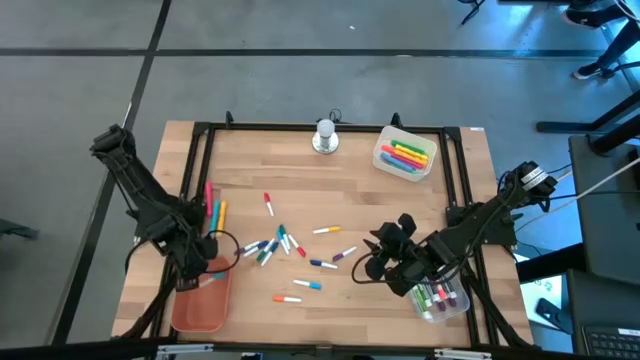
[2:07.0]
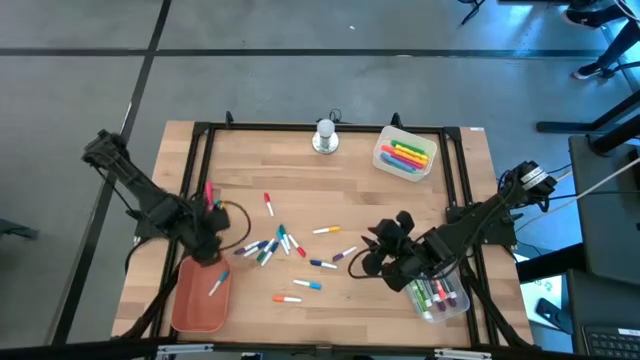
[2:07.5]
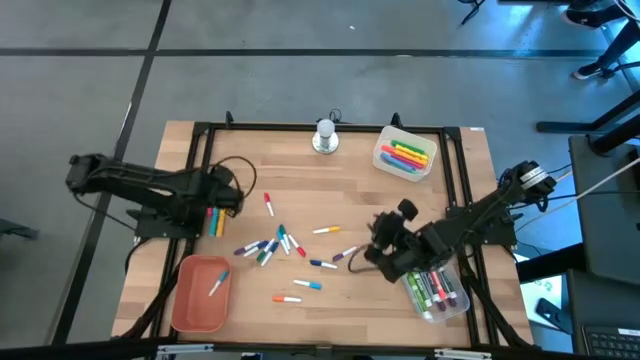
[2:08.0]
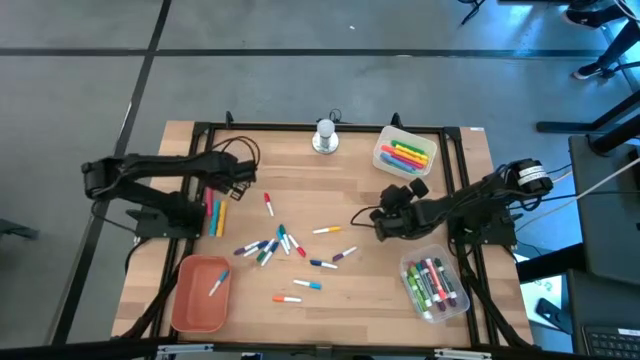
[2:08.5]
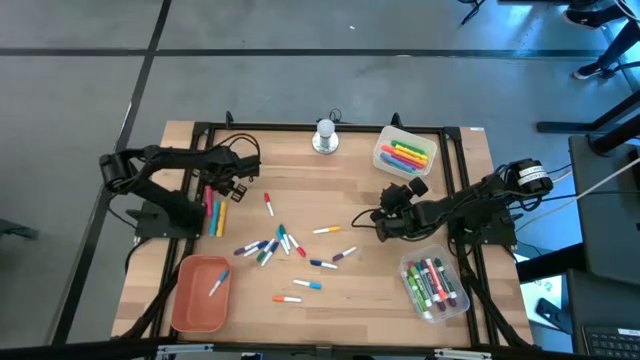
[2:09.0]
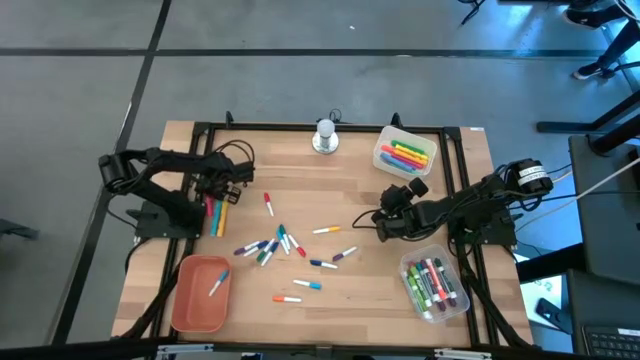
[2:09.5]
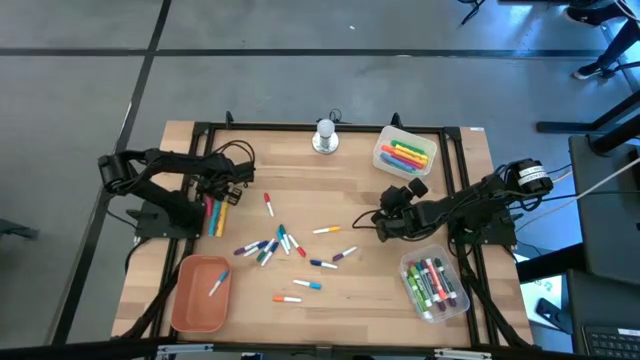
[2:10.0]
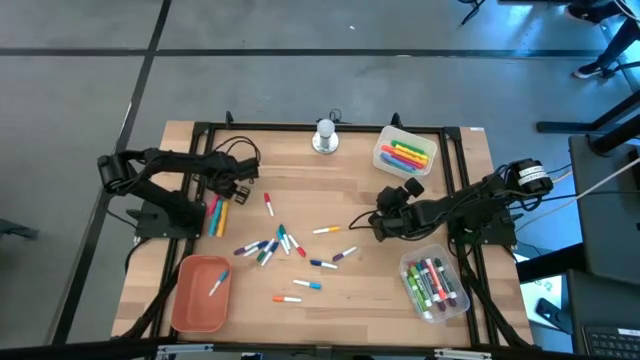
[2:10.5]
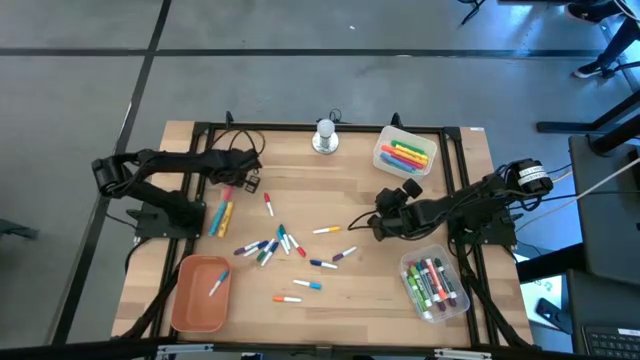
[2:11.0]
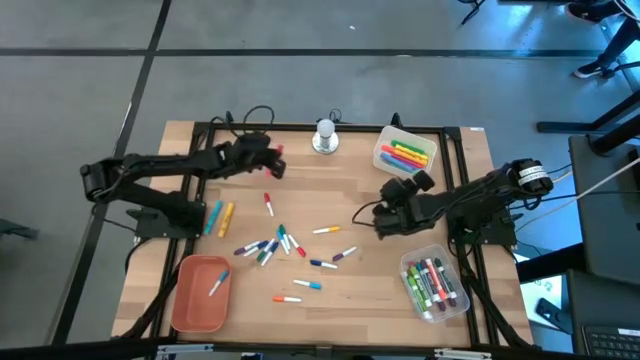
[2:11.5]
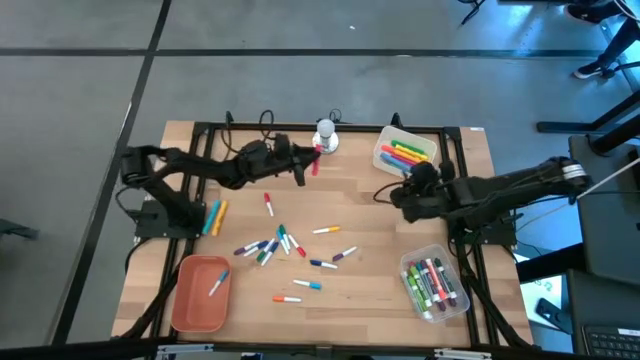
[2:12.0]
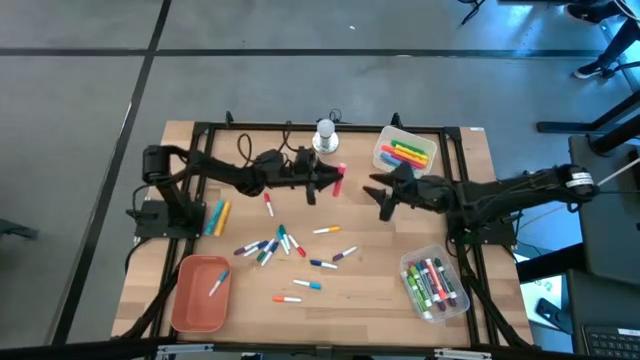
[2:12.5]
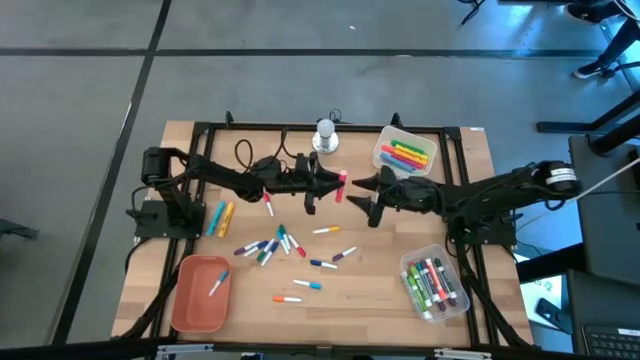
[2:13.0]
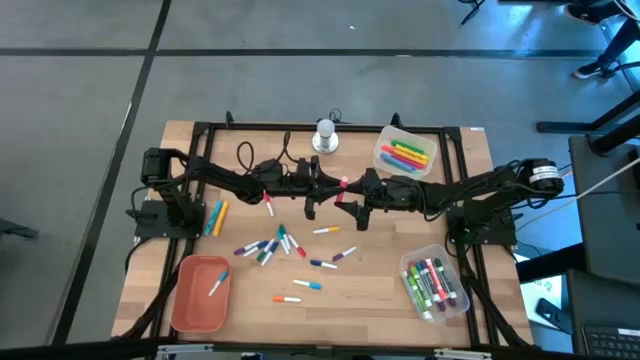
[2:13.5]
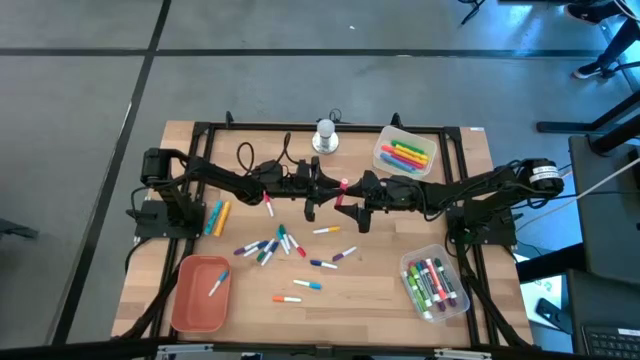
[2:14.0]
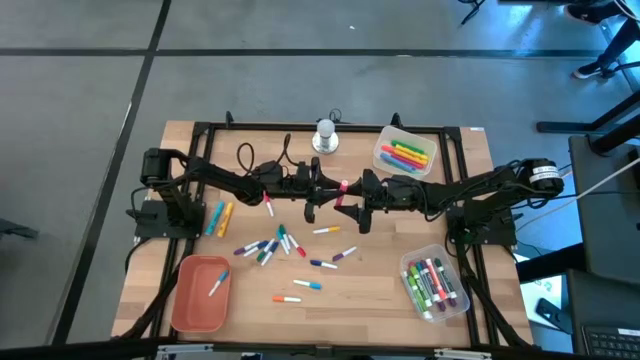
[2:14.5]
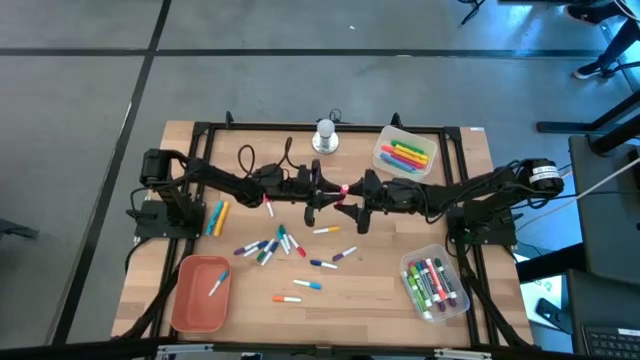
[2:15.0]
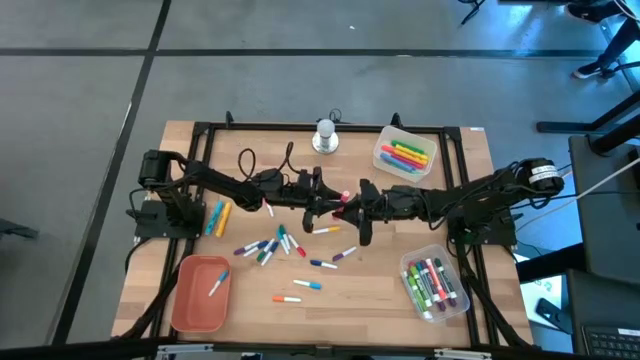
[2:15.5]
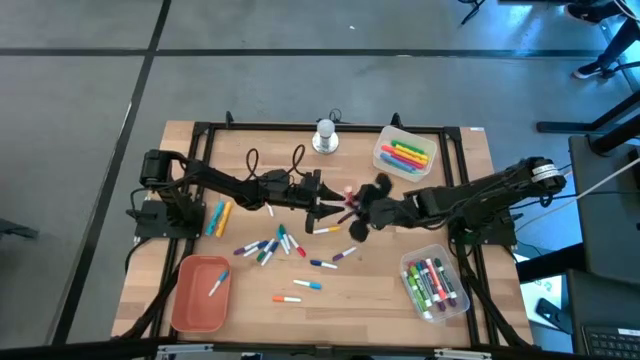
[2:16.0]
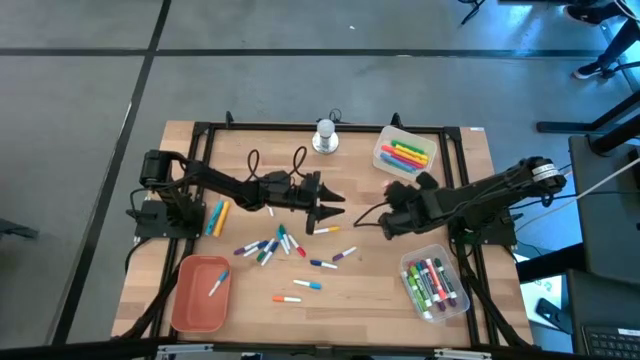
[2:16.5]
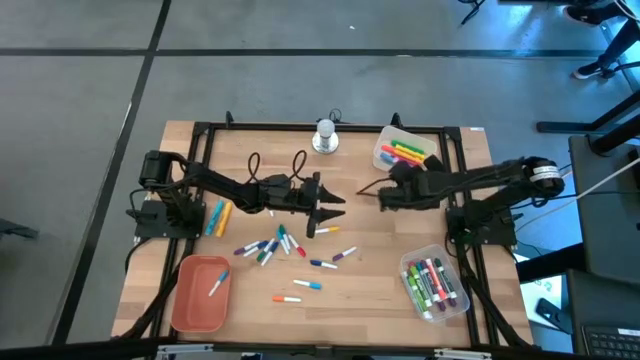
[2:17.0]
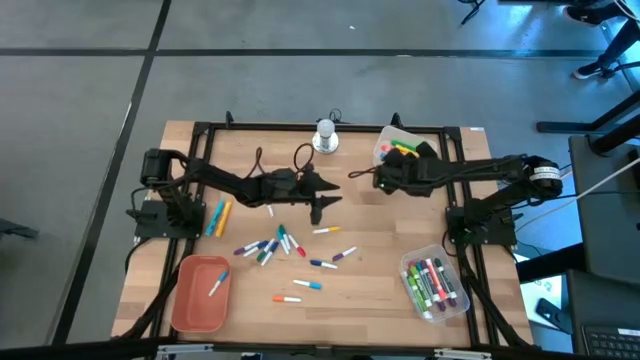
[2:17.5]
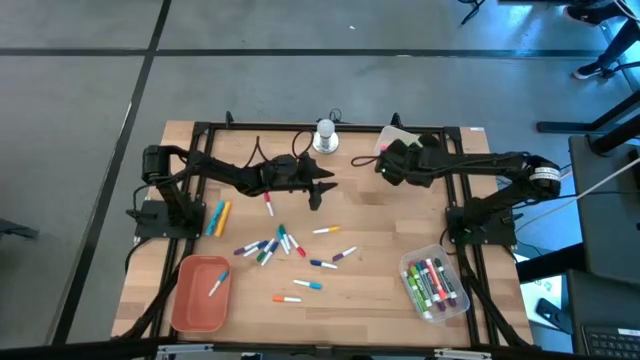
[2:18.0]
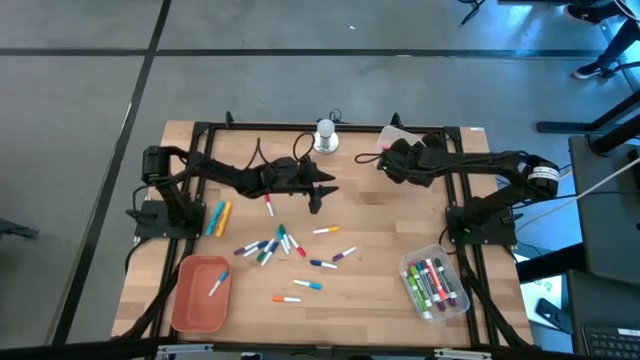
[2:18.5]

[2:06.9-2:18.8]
Task: Pick & Place Markers
Put the large orange highlighter pen into the white bin

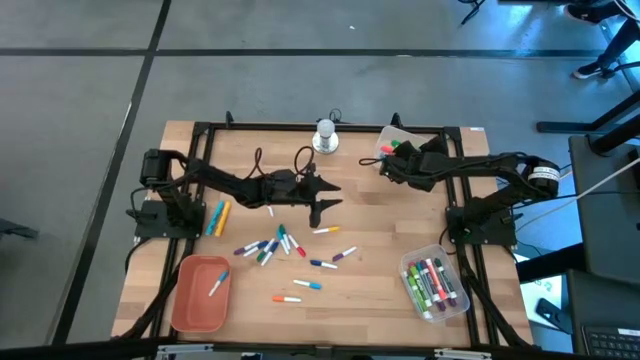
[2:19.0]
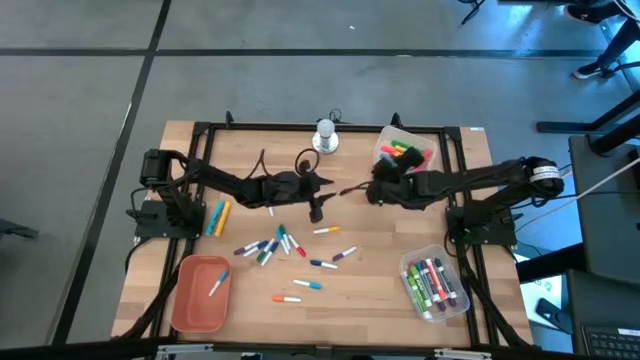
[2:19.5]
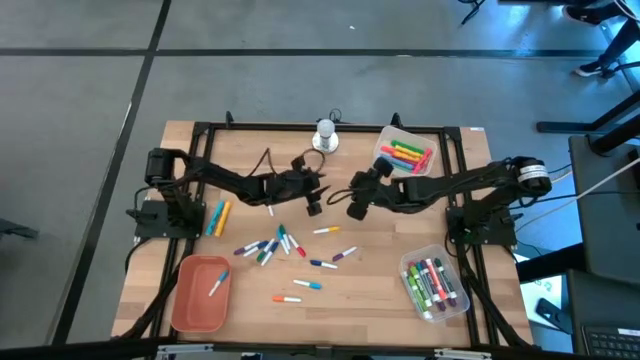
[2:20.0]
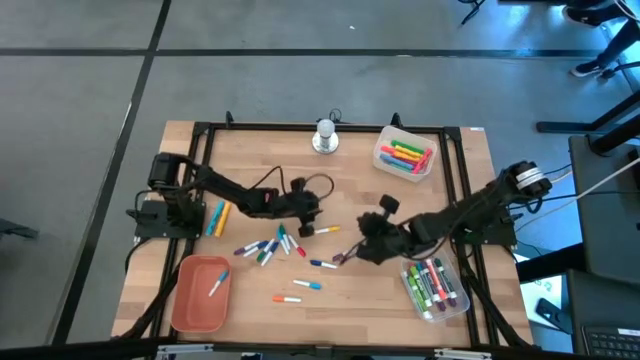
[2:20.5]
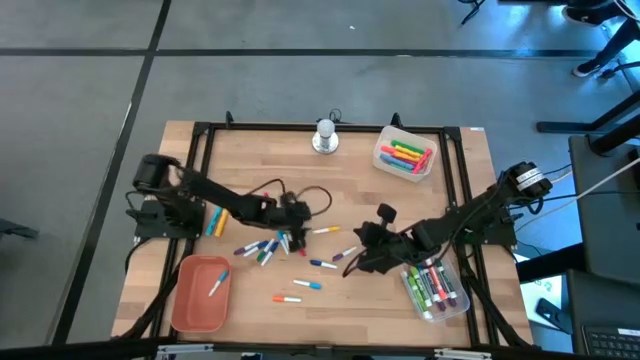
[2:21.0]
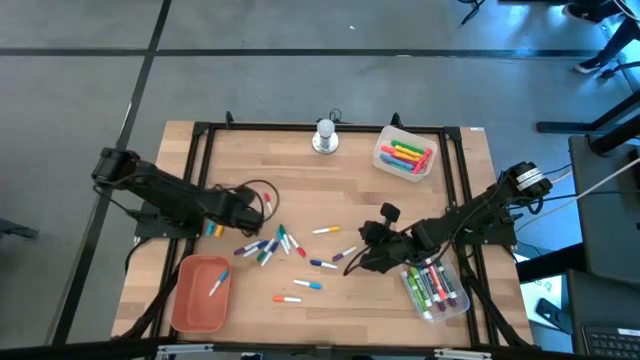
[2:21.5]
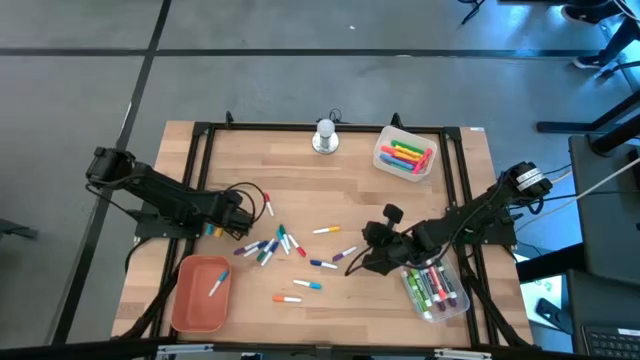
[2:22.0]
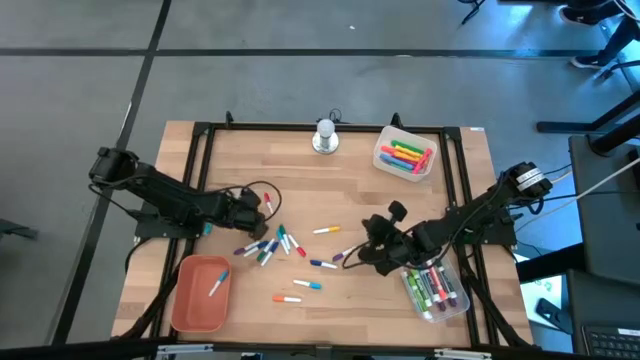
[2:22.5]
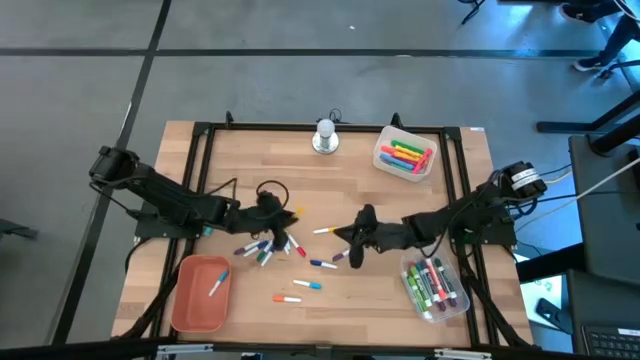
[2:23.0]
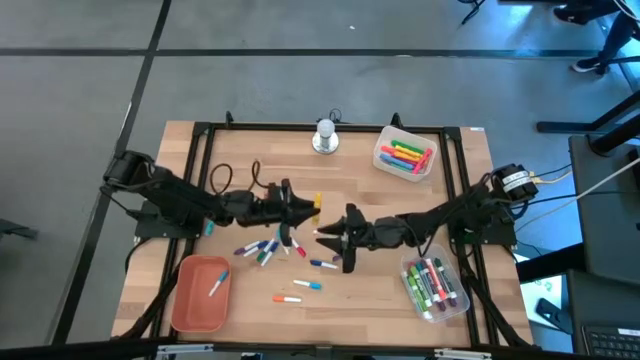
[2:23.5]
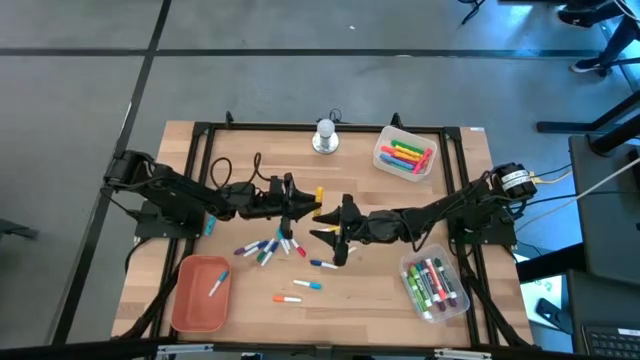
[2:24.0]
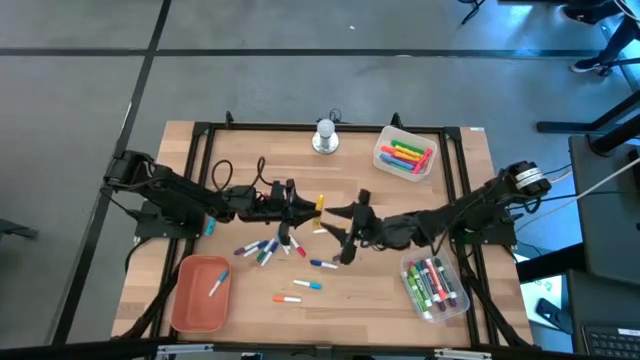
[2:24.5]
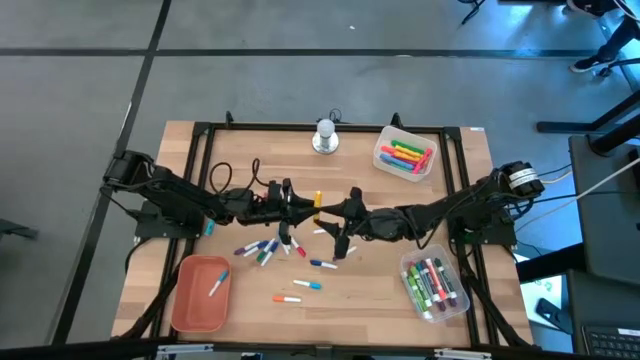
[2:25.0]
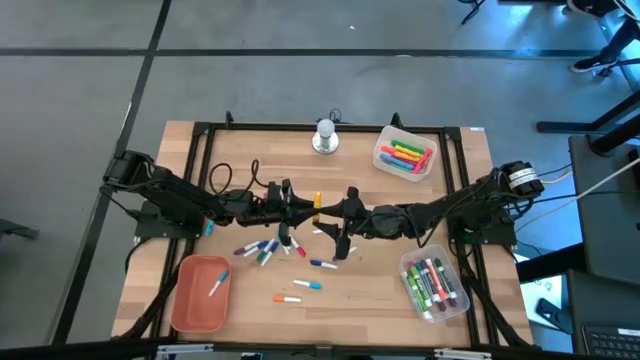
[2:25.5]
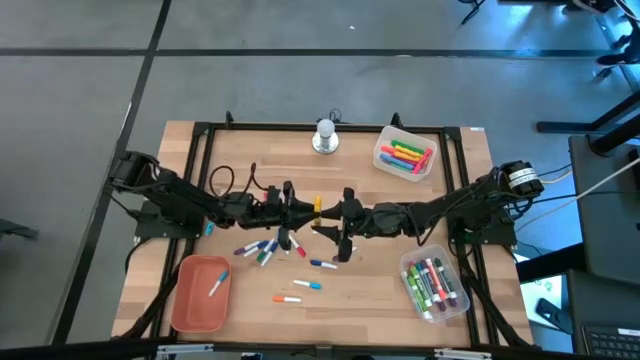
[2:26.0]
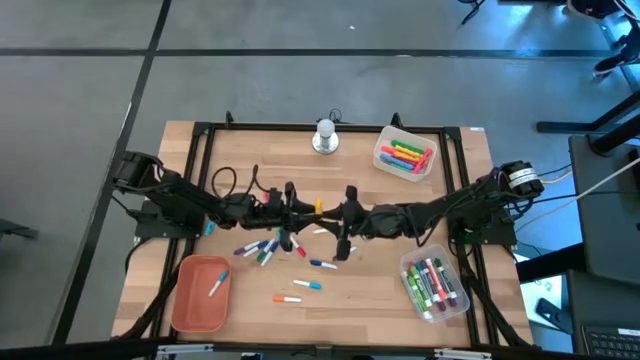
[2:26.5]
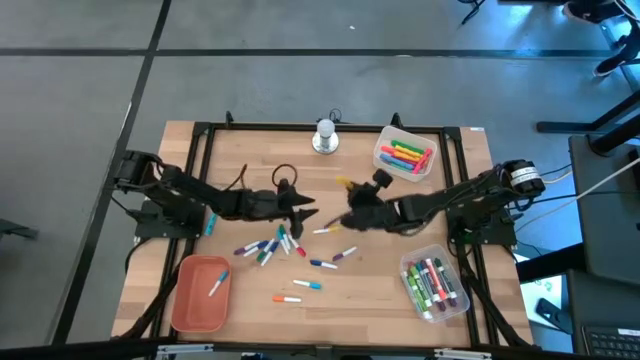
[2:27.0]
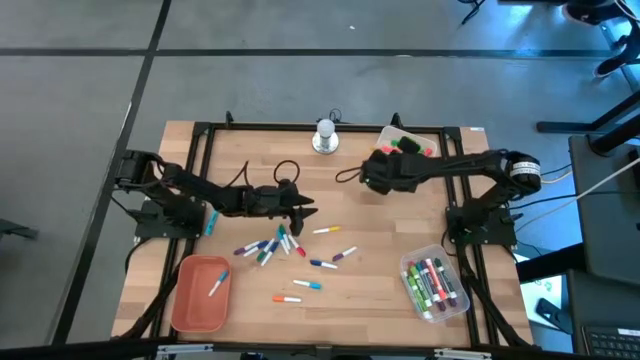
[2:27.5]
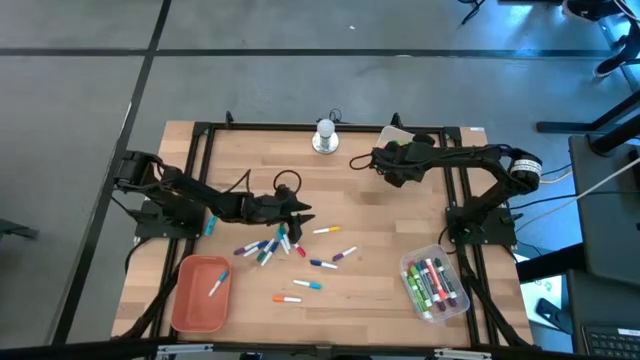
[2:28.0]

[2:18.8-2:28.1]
Put the large yellow highlighter pen into the white bin
